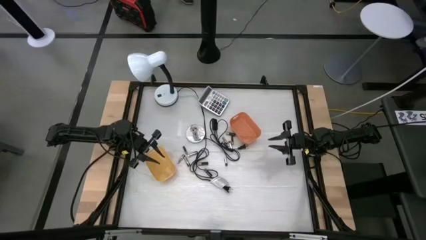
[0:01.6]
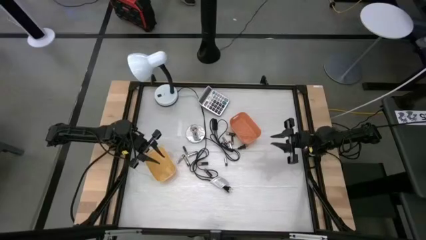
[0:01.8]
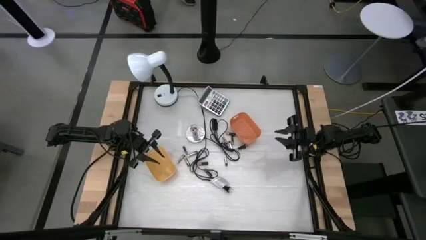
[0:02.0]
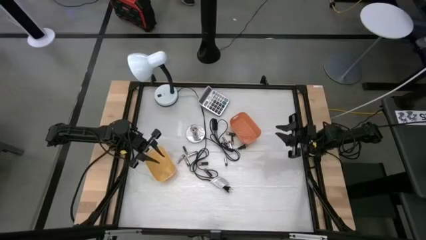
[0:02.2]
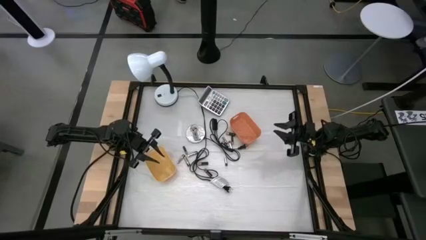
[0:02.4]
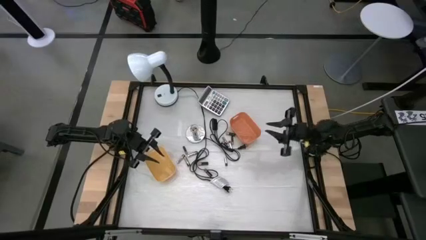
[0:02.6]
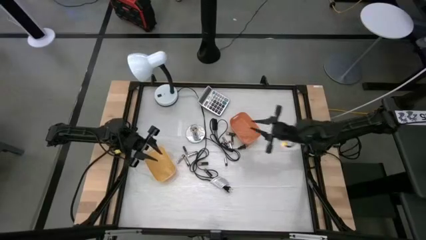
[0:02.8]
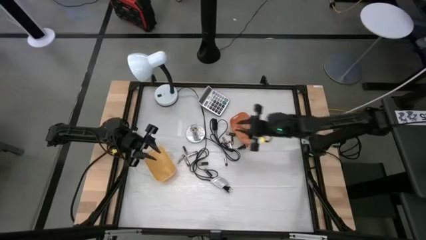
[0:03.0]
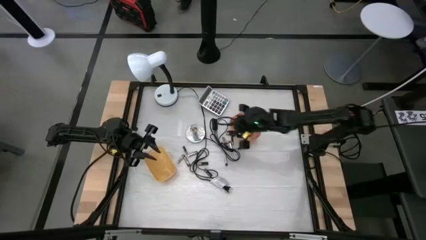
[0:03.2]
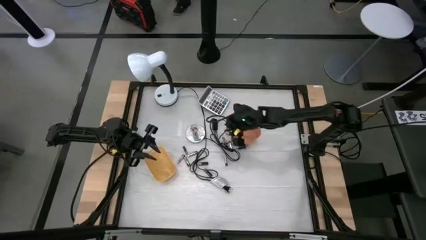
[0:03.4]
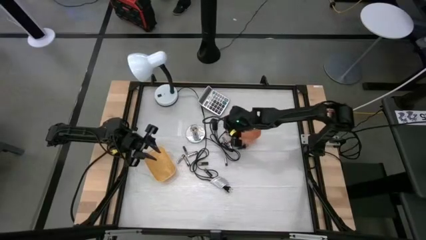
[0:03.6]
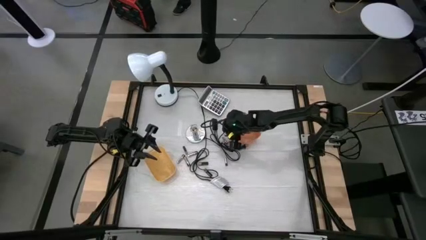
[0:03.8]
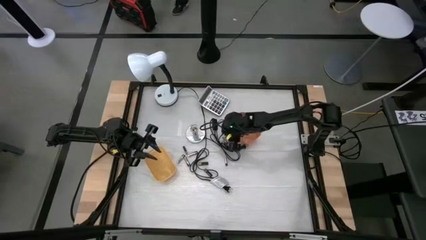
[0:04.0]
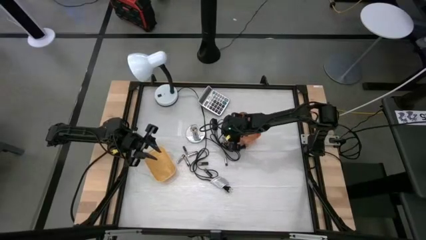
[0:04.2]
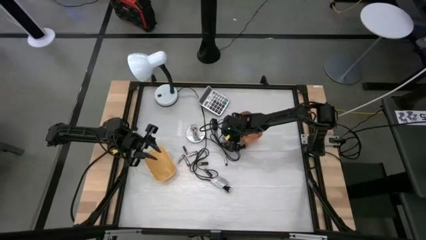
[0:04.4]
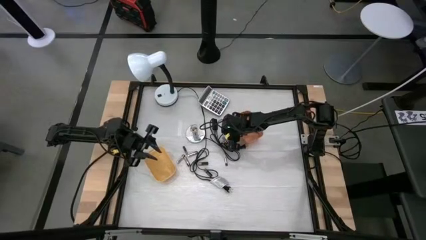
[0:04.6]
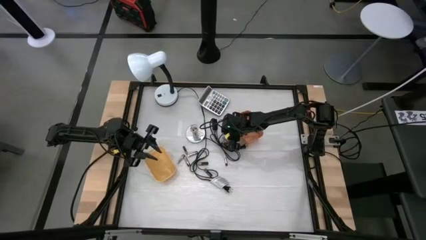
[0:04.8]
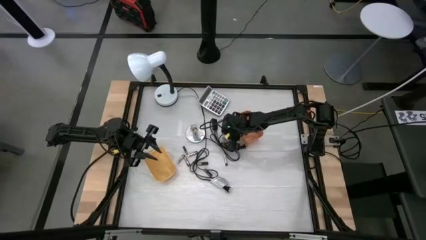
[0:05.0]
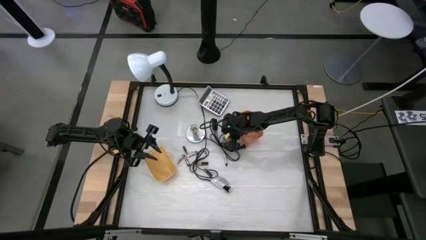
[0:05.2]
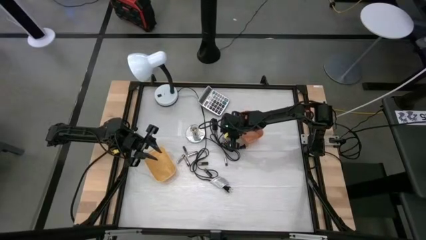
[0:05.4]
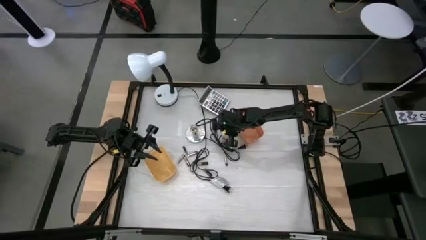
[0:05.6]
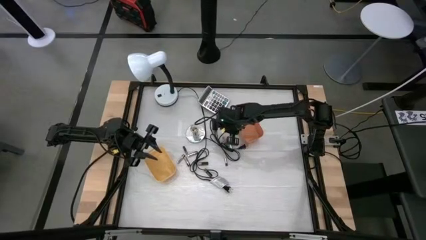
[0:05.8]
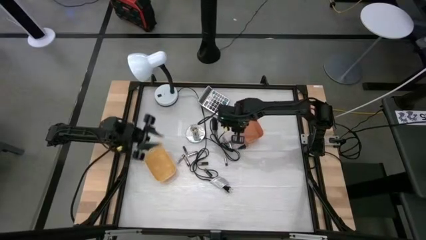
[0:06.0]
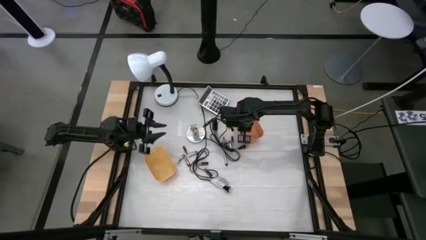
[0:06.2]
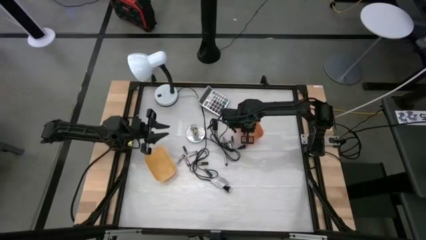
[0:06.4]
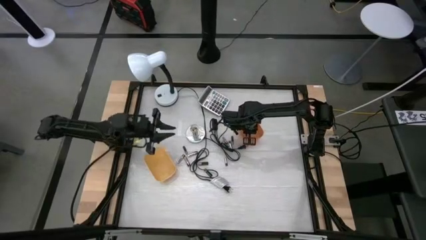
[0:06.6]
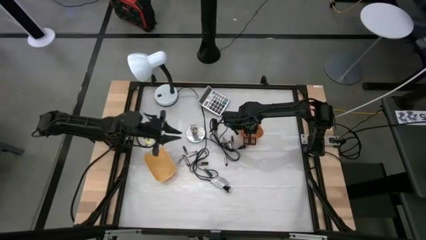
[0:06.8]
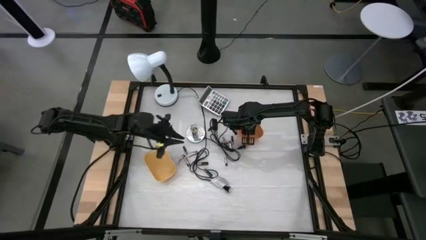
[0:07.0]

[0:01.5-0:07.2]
Task: Sort batteries
Put the brown battery into the orange bin

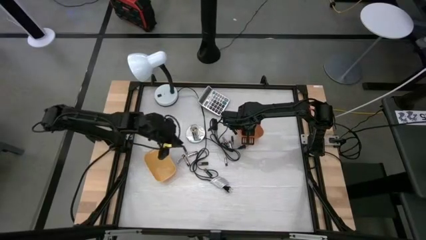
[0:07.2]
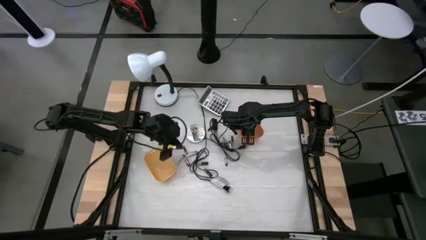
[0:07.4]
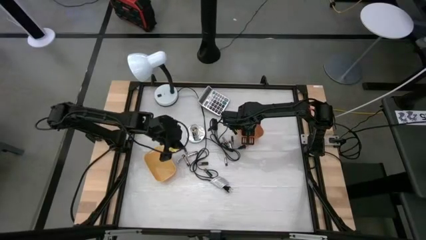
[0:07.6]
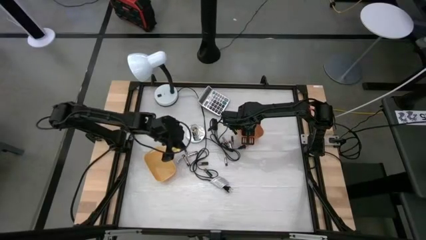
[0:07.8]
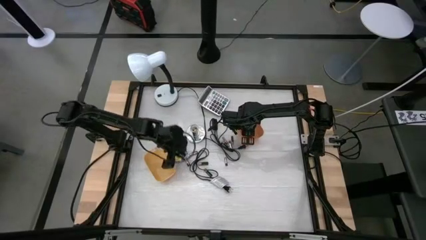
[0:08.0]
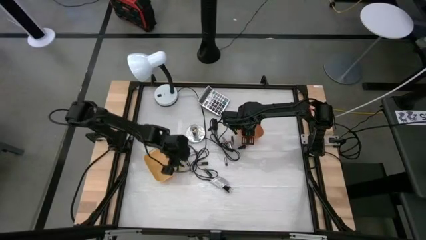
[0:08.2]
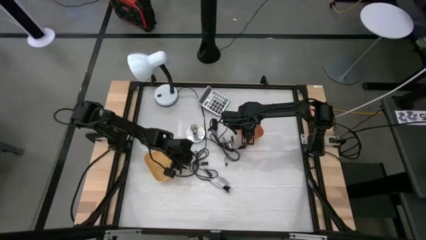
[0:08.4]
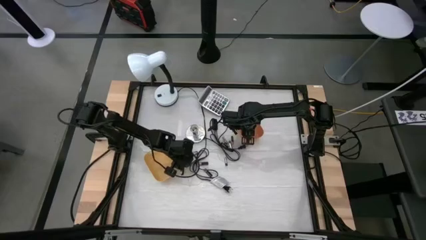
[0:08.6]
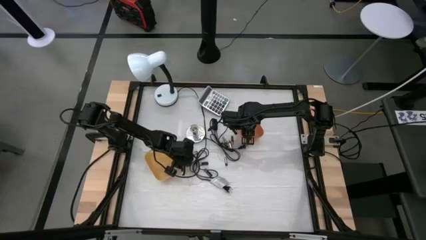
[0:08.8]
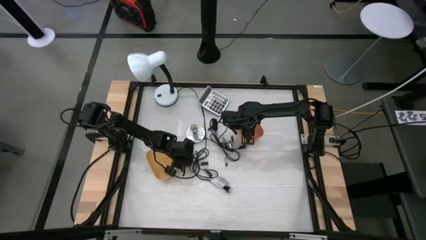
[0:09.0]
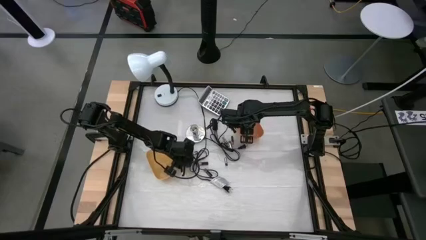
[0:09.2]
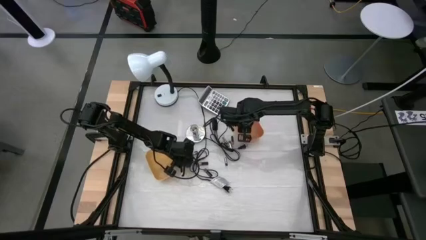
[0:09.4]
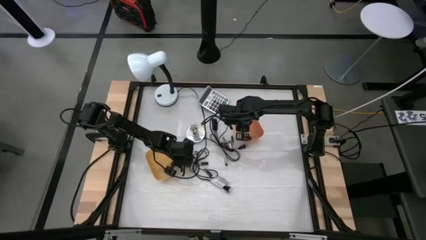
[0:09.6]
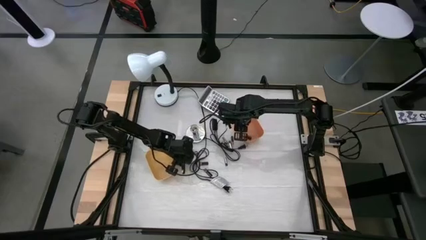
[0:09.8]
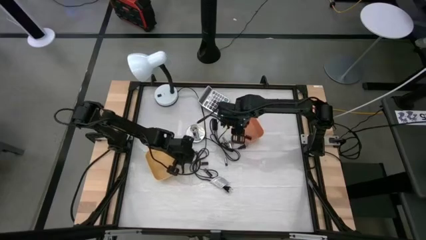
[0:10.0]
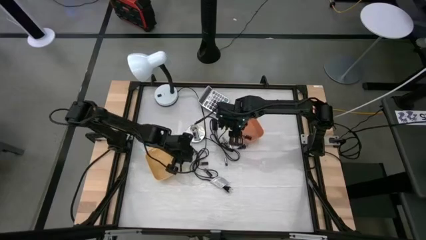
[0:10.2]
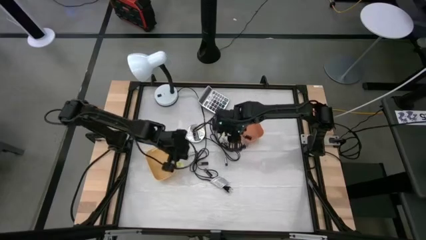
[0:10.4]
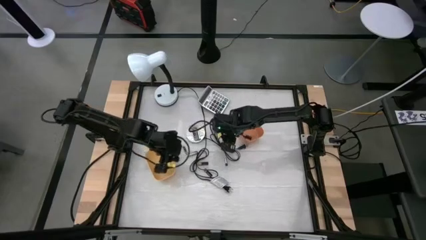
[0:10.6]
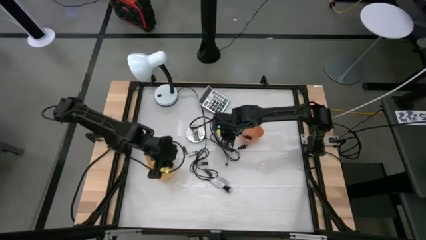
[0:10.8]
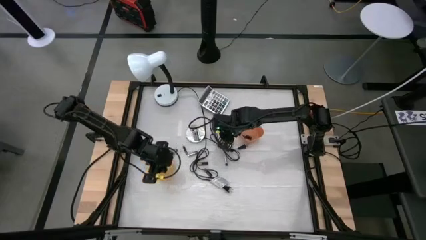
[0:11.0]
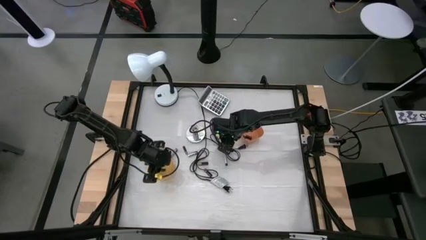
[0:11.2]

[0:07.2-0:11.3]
Put the silver battery into the yellow bin

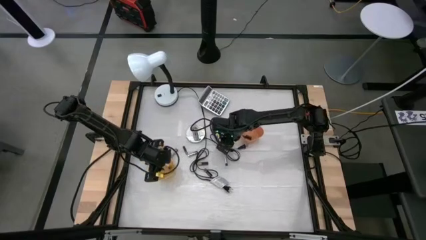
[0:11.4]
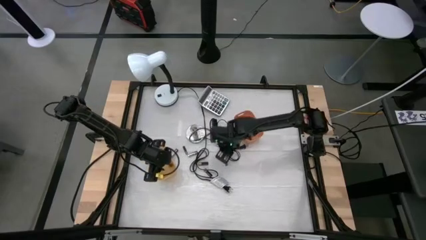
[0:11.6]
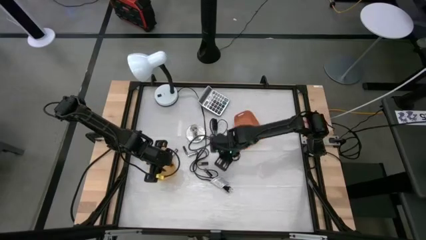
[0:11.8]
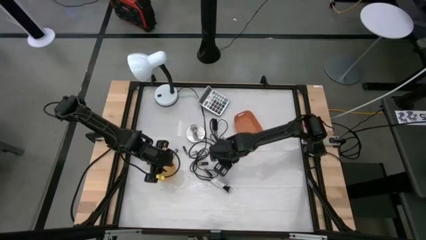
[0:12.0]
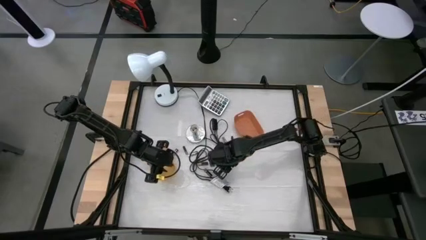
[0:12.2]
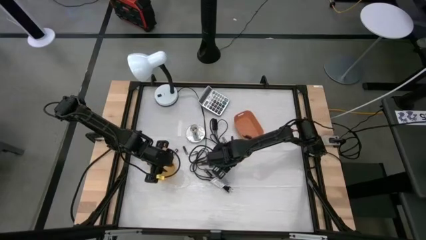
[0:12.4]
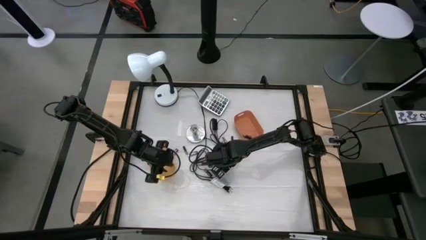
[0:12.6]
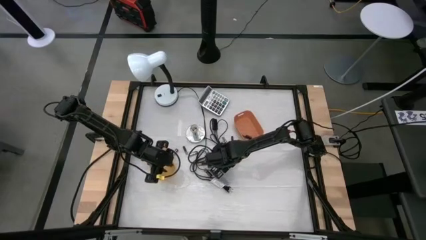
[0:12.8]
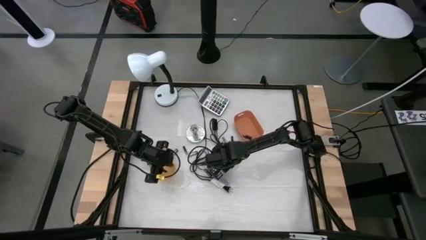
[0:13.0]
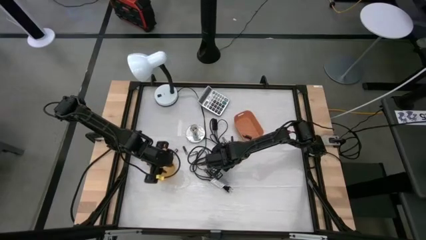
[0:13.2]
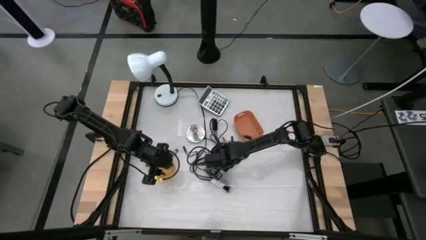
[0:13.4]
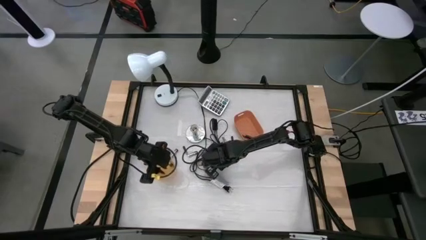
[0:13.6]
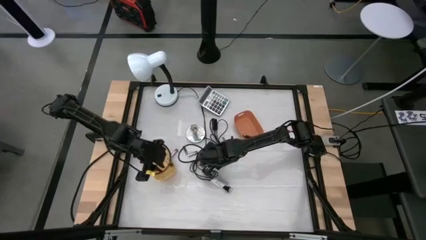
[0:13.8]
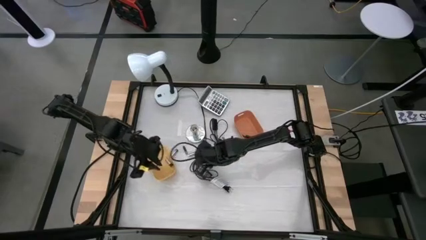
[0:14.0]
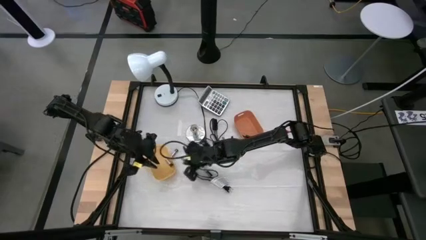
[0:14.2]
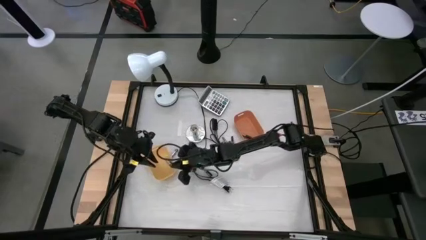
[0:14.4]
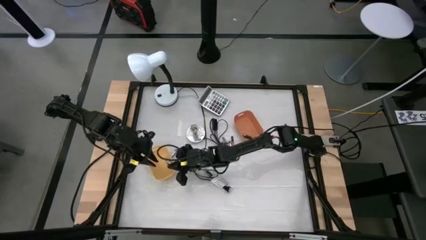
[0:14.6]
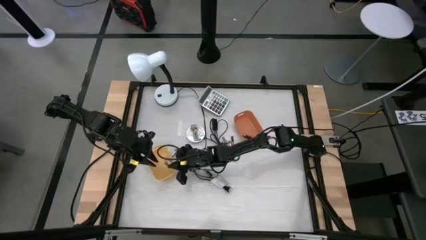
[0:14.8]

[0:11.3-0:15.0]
Put the silver battery into the yellow bin

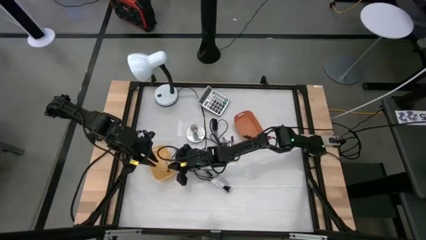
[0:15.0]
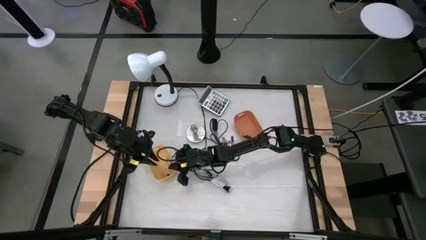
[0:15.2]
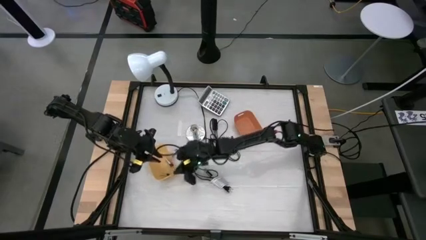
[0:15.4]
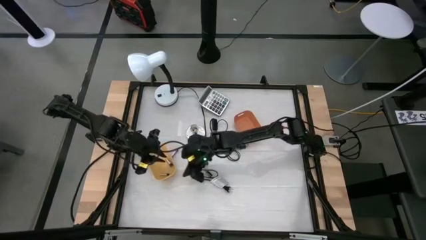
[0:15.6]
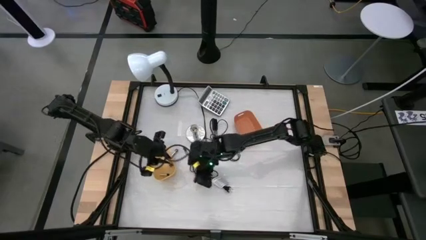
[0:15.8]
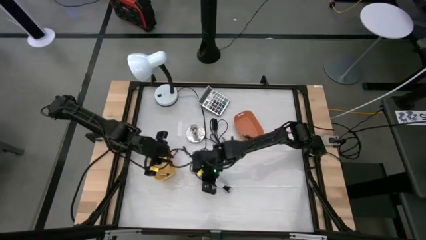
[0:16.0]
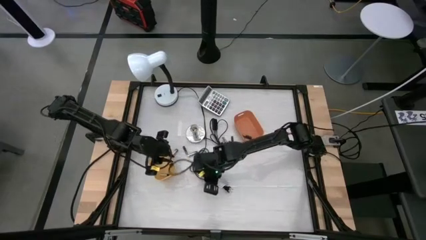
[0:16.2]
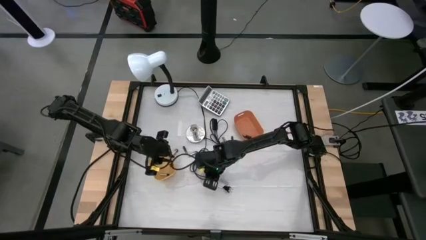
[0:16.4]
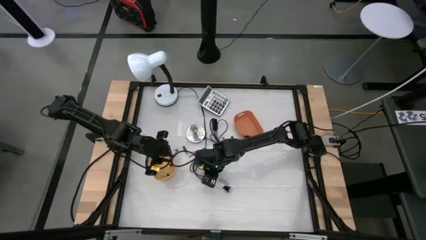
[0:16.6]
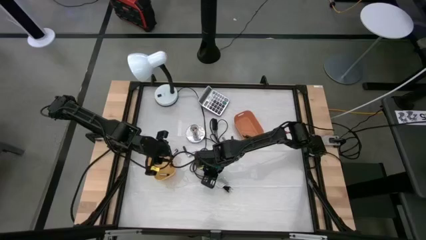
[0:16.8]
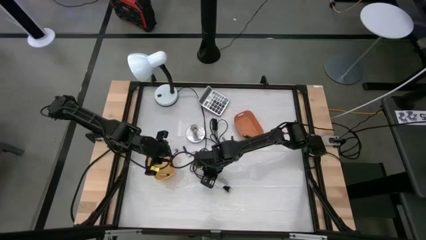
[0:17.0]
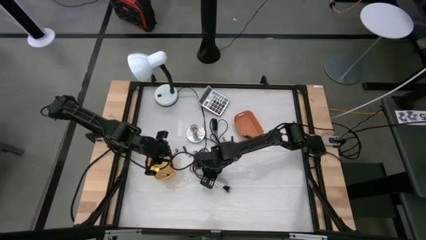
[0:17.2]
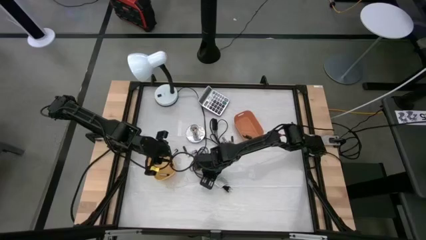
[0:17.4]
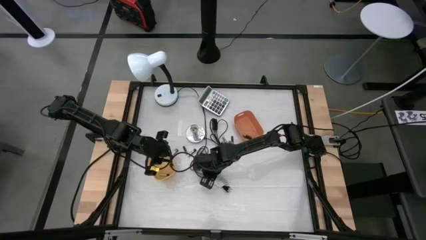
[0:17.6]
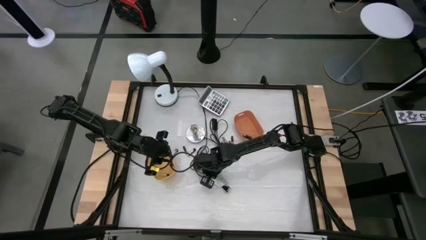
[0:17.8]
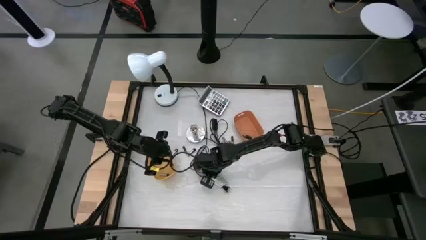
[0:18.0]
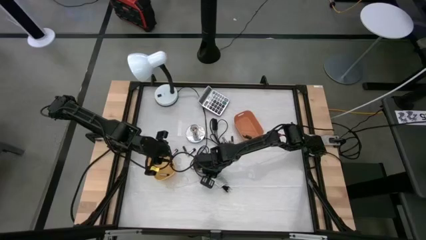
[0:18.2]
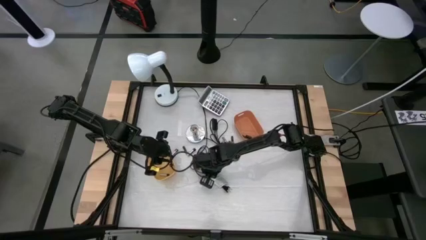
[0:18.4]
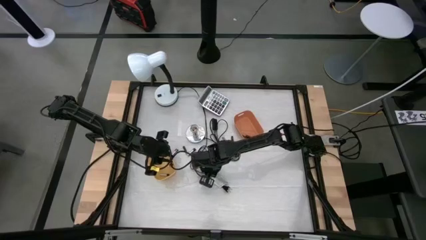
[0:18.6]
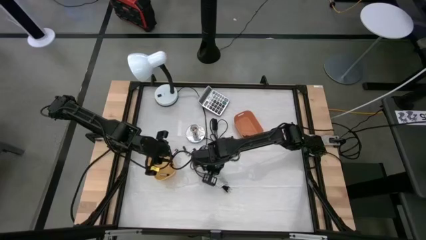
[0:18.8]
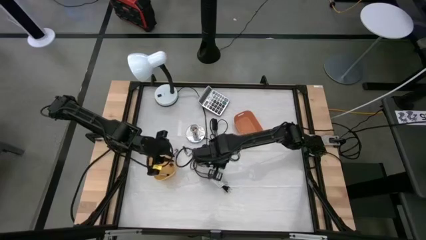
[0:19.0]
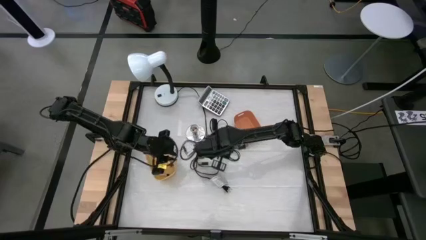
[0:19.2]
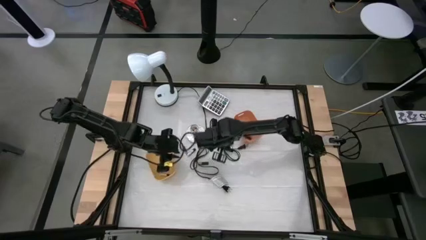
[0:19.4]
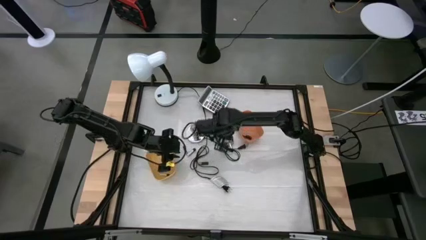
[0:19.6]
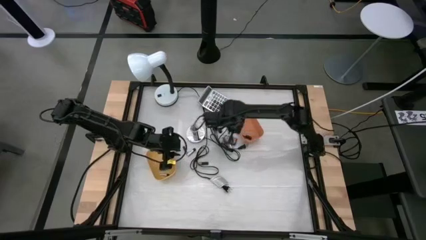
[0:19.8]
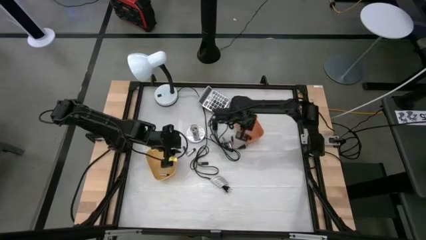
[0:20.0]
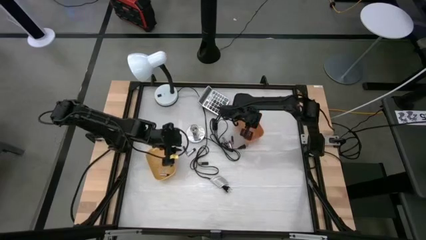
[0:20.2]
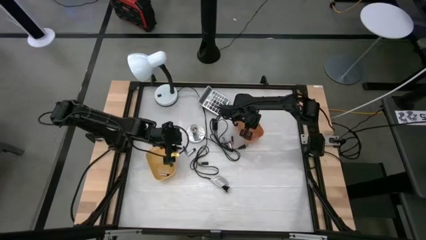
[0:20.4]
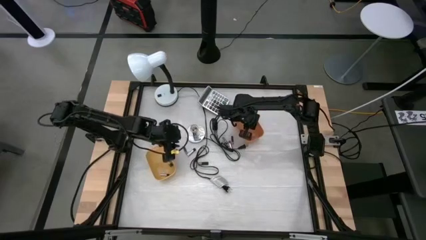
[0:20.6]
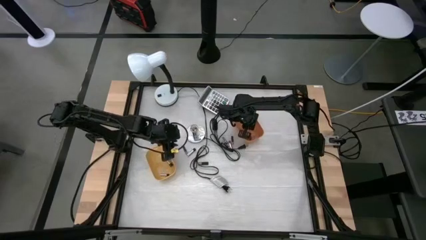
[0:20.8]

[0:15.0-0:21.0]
Put the brown battery into the orange bin
